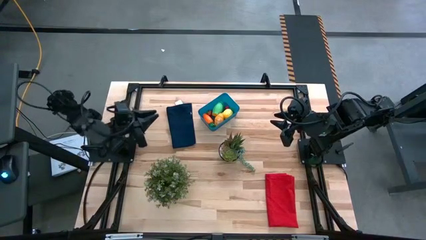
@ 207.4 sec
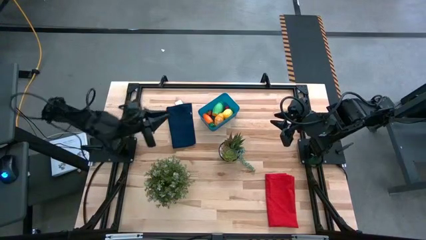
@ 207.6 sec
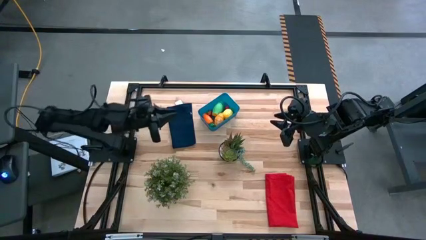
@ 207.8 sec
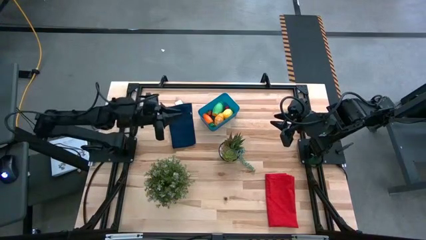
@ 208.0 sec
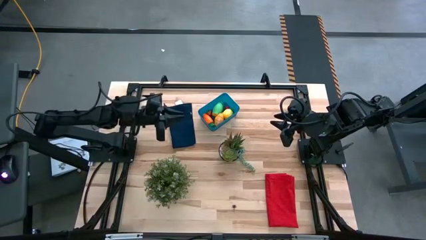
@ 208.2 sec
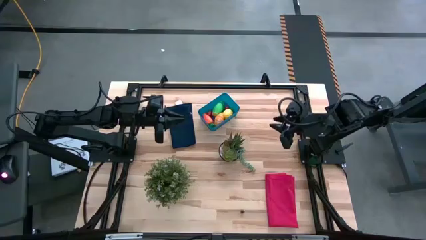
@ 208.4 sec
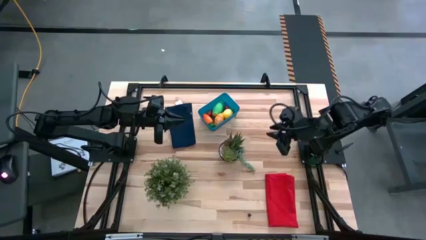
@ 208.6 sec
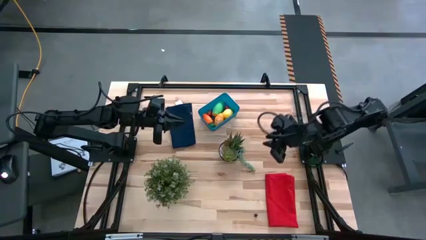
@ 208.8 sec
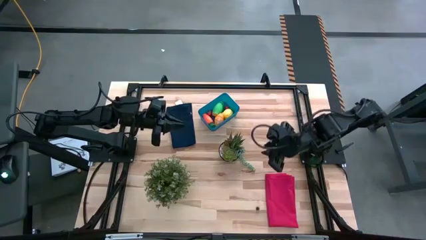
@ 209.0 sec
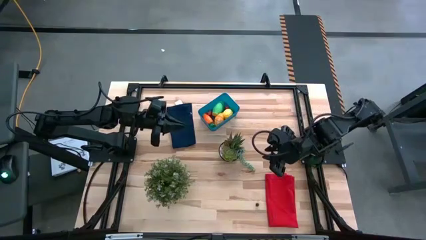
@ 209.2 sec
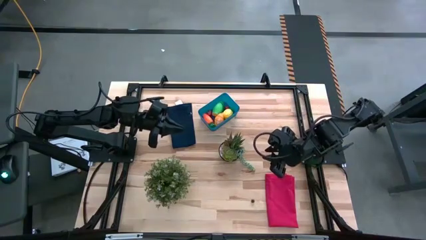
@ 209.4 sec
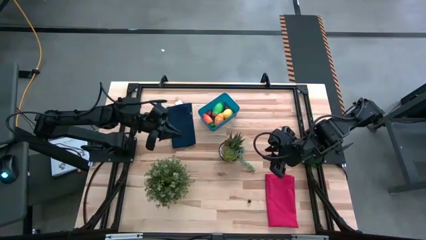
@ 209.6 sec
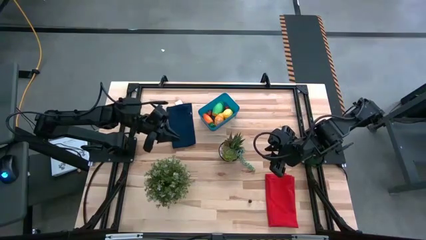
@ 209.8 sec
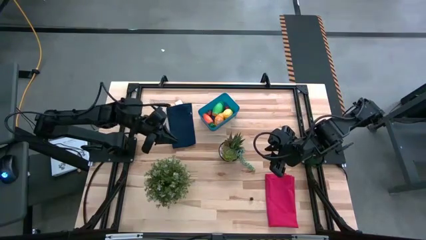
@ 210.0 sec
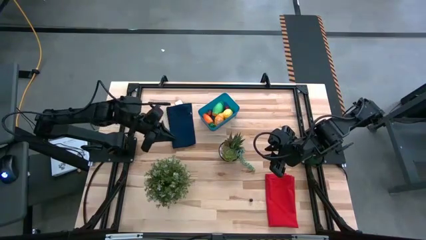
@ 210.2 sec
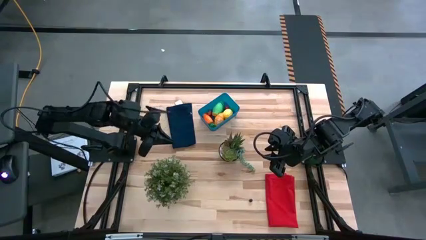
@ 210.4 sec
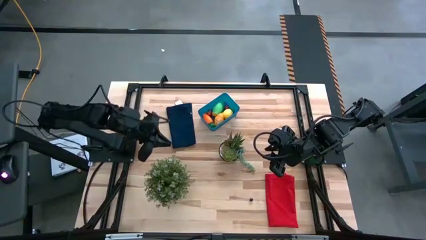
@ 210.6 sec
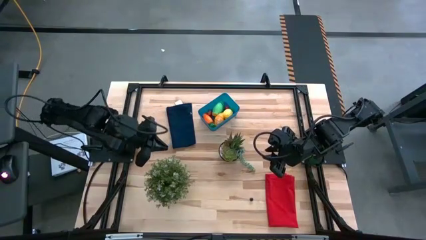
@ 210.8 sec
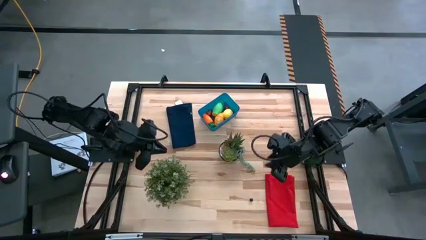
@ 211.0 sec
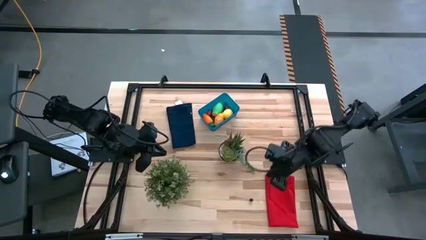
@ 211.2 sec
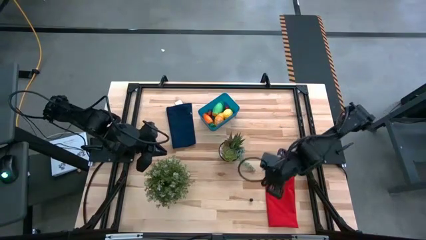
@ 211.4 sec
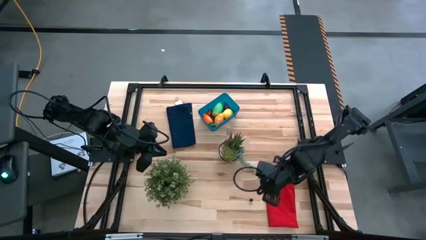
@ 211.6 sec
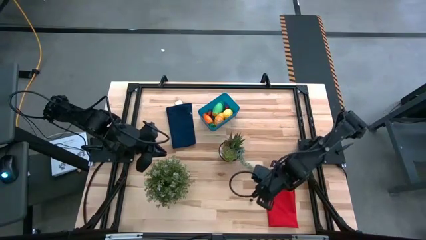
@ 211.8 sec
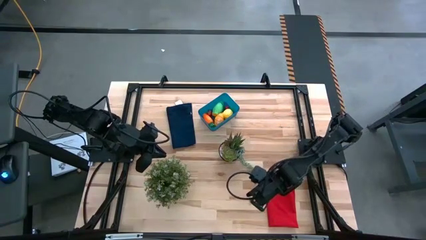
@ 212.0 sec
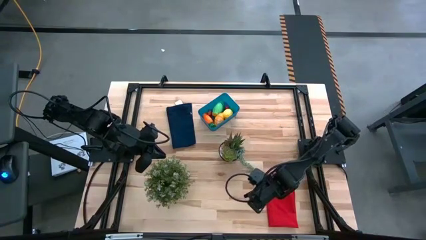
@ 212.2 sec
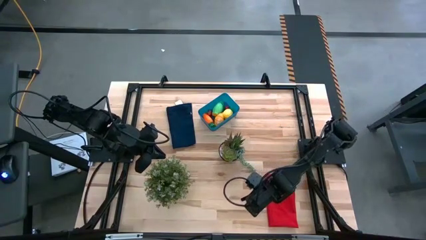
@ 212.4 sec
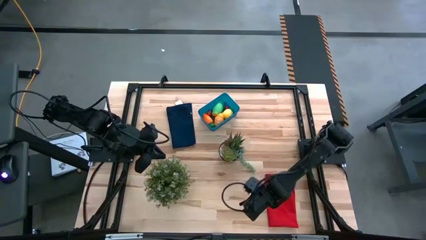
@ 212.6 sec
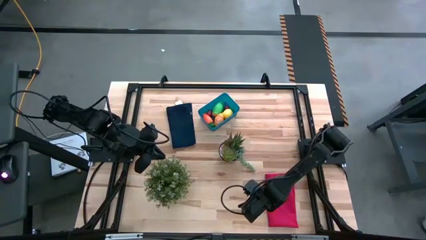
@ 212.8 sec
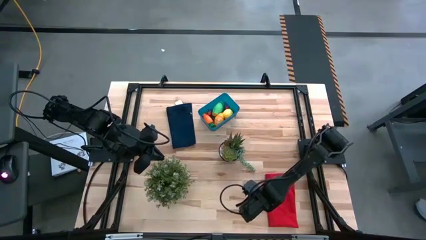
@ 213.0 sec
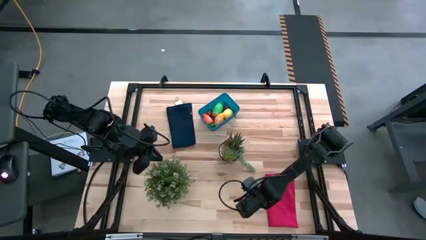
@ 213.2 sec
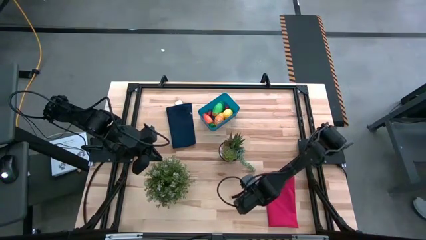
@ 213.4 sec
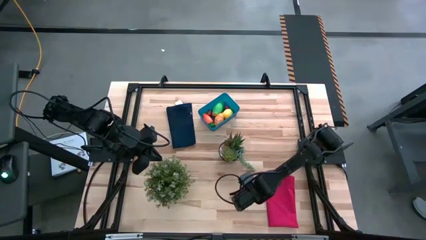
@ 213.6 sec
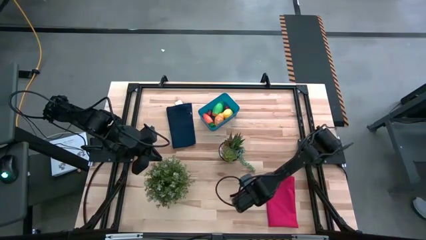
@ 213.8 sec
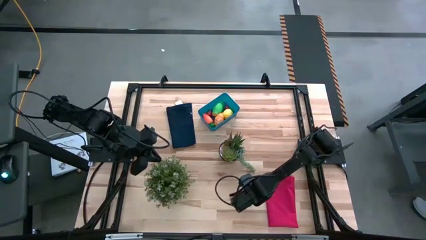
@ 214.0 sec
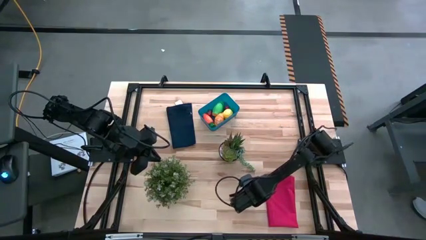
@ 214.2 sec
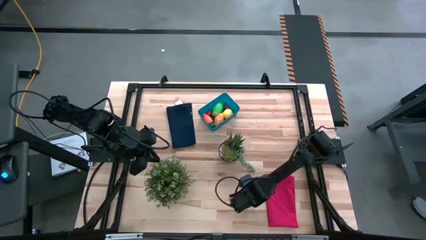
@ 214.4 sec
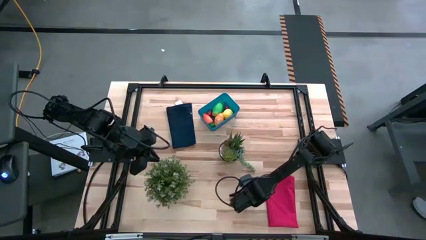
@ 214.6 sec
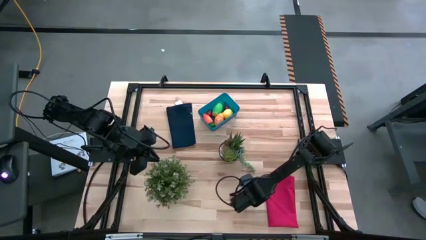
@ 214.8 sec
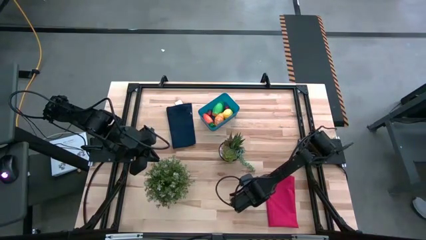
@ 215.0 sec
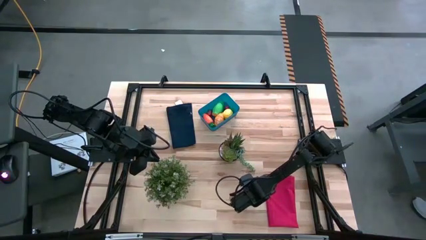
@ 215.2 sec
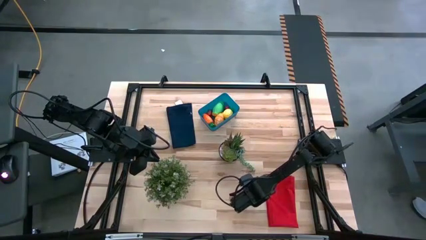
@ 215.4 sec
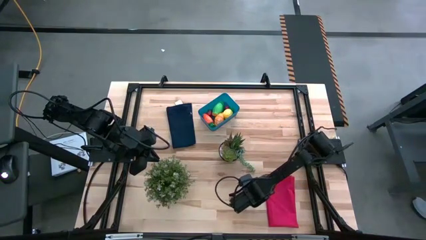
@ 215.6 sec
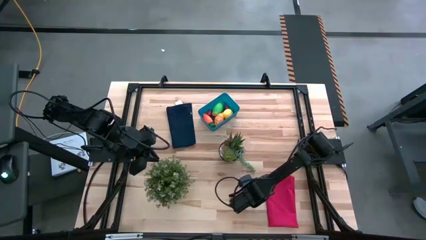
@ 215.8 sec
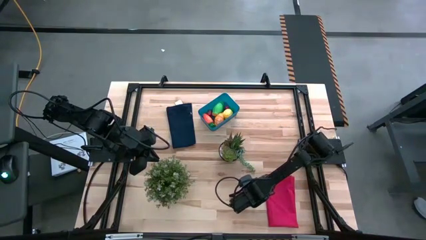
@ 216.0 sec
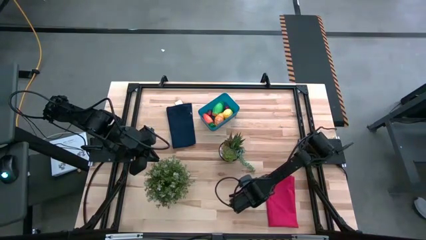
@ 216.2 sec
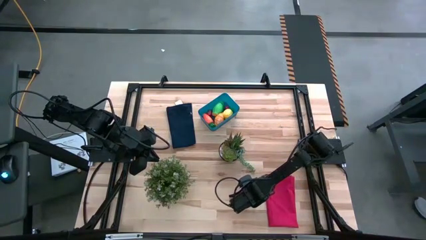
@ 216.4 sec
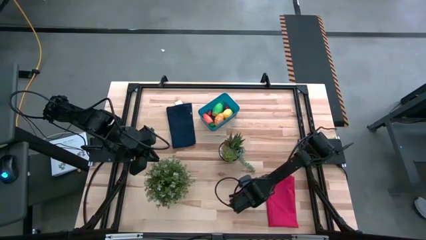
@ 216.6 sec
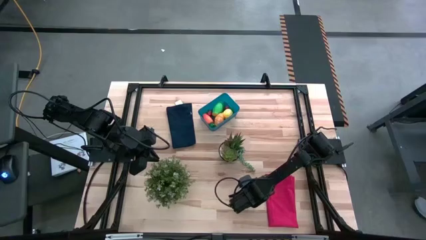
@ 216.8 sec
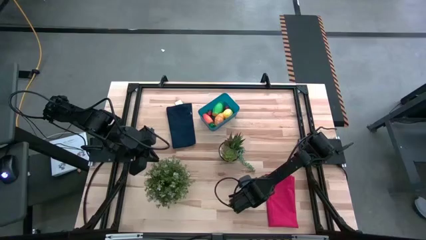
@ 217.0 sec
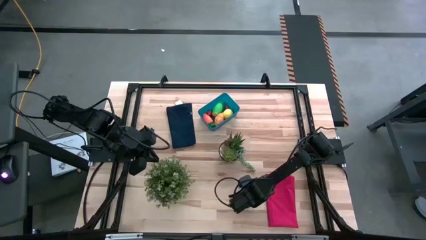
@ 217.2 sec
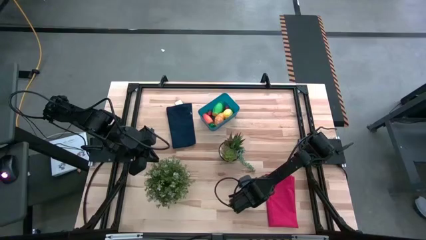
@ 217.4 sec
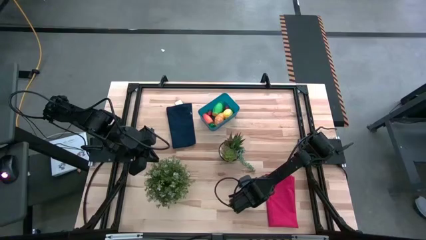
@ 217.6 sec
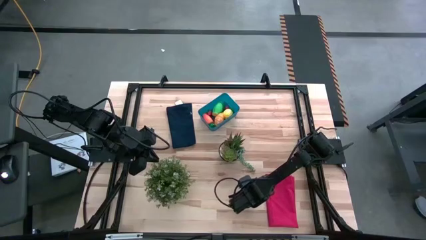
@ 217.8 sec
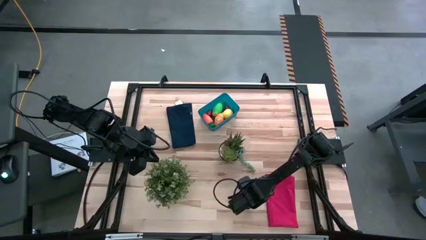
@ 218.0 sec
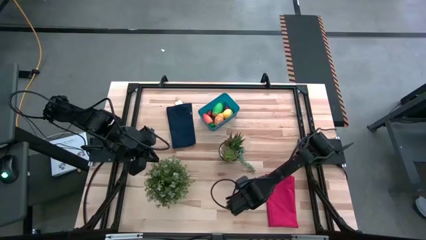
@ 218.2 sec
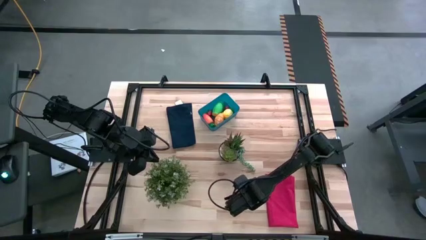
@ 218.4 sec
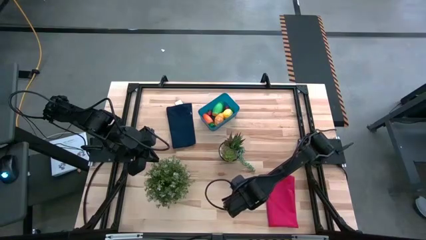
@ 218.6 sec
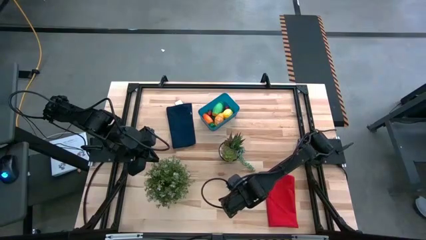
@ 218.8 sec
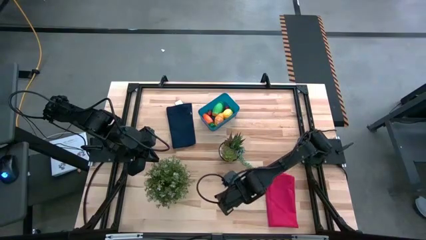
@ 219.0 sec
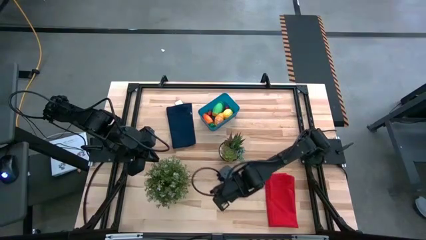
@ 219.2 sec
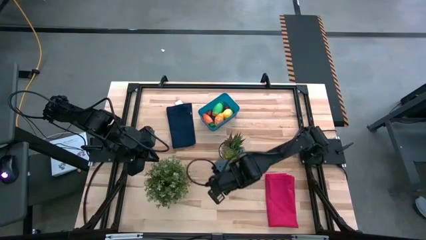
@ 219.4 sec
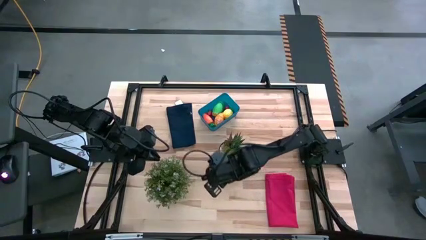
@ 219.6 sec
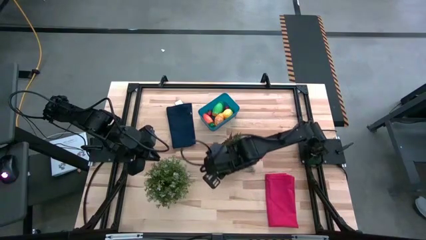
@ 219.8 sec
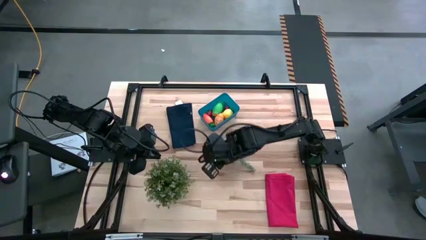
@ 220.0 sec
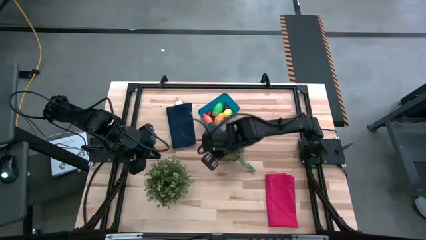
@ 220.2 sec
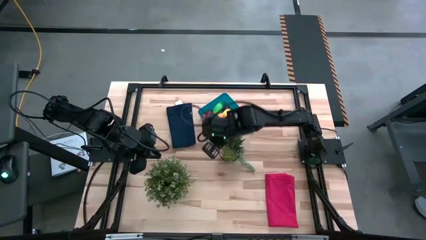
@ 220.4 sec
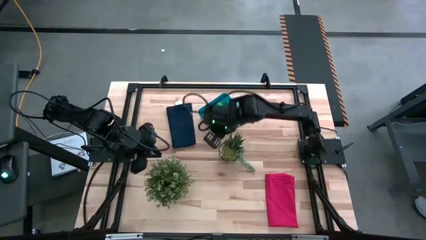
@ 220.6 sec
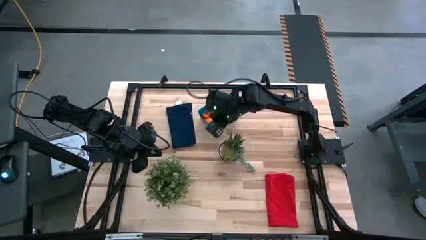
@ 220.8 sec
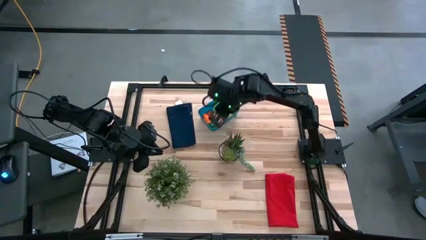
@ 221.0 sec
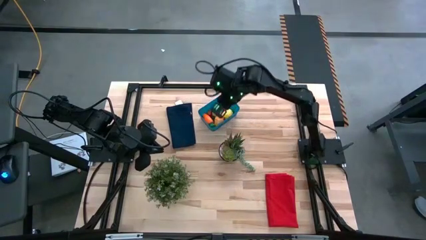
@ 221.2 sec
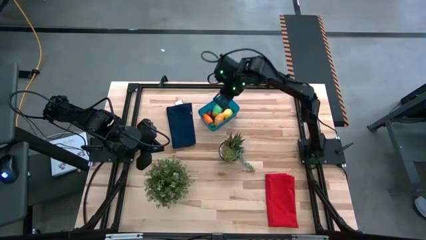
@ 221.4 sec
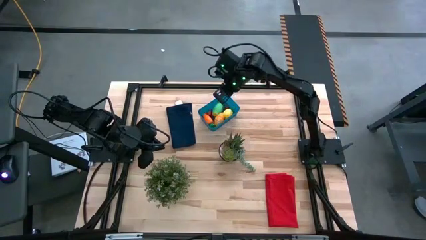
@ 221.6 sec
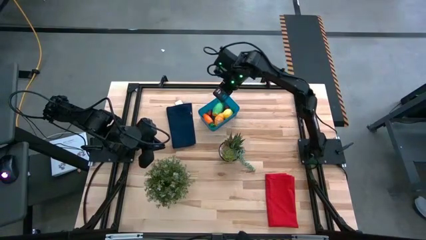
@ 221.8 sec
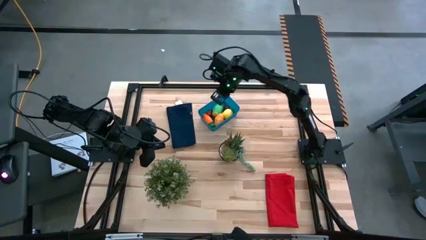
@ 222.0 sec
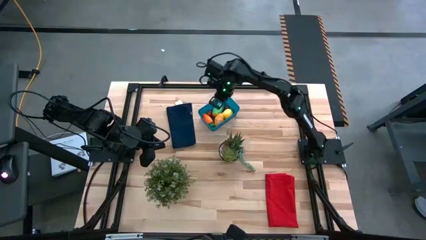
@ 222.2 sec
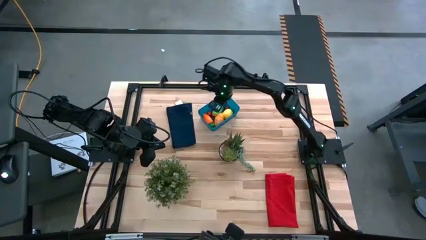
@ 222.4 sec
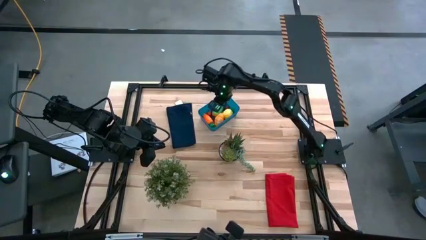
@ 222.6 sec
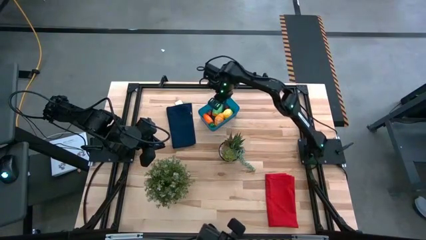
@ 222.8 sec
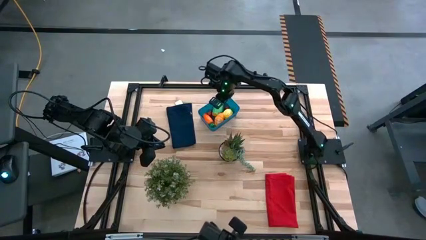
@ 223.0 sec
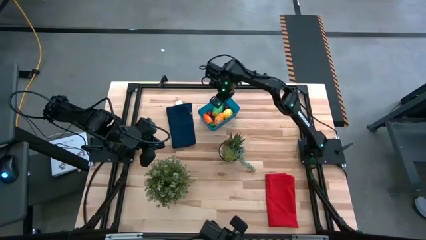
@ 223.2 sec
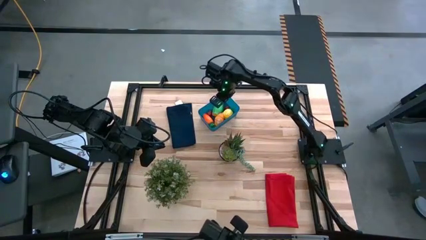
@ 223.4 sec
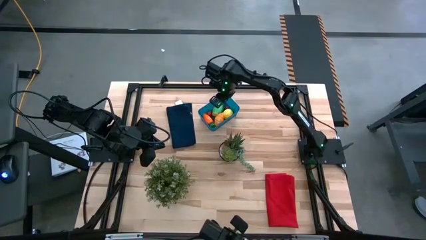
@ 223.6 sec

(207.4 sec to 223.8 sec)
Task: Pick and placing Produce into tupperware
Put the blue berry into the bin
